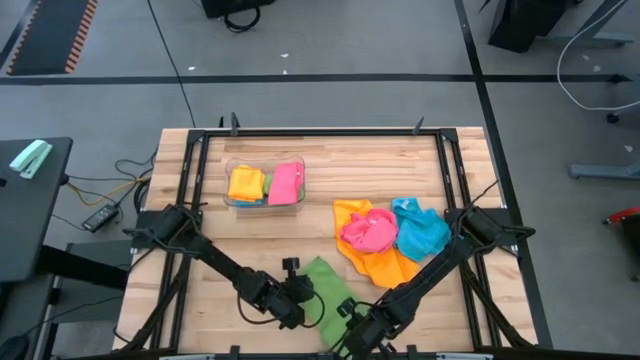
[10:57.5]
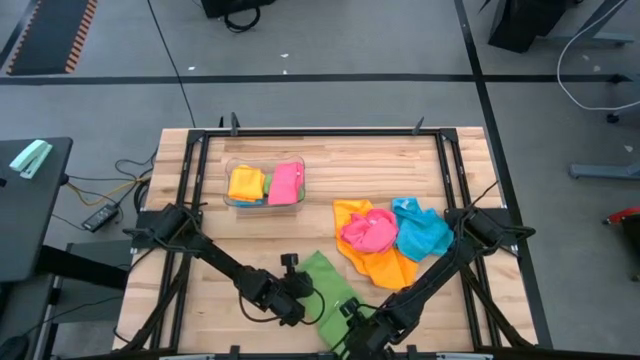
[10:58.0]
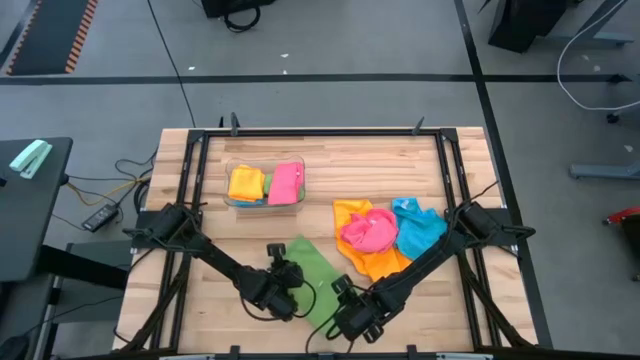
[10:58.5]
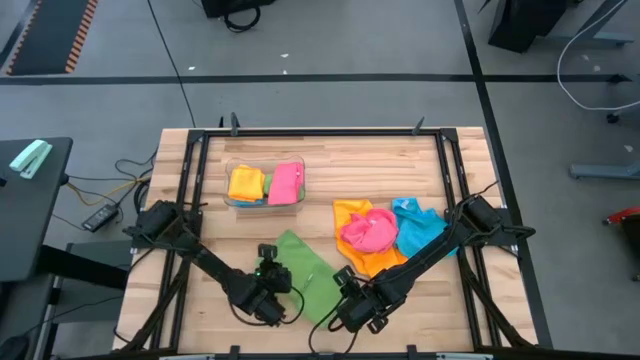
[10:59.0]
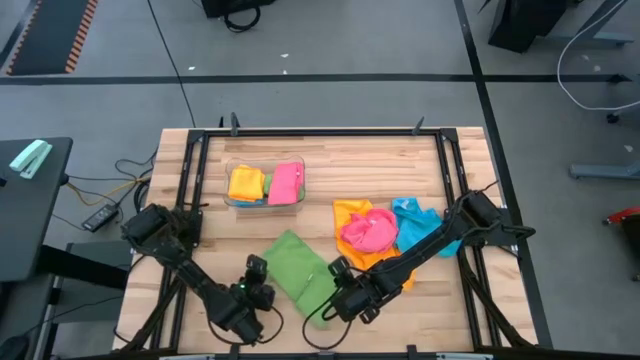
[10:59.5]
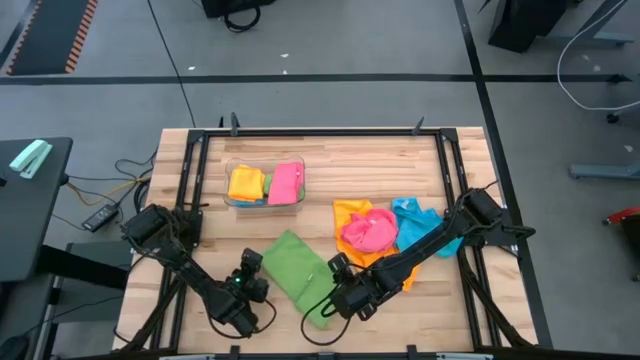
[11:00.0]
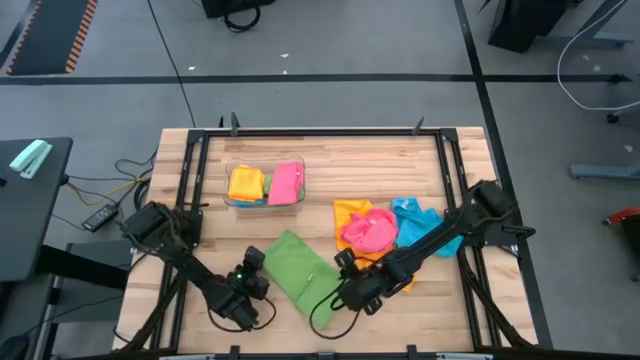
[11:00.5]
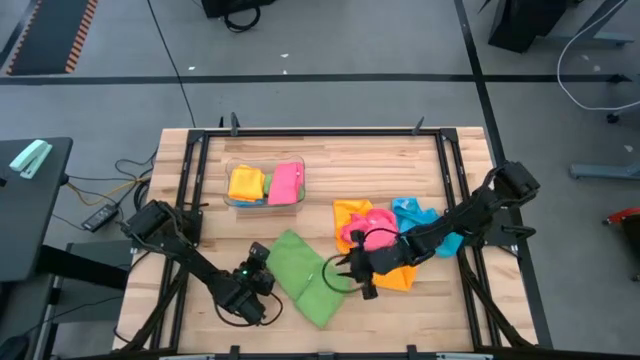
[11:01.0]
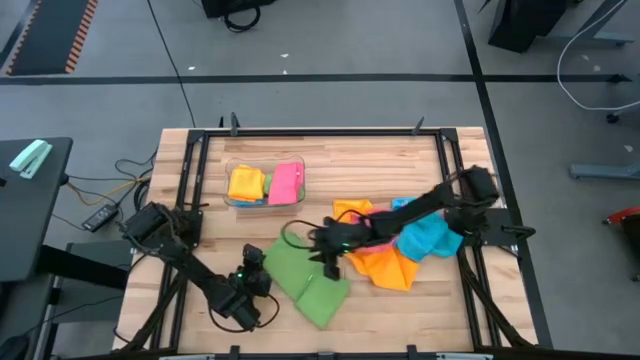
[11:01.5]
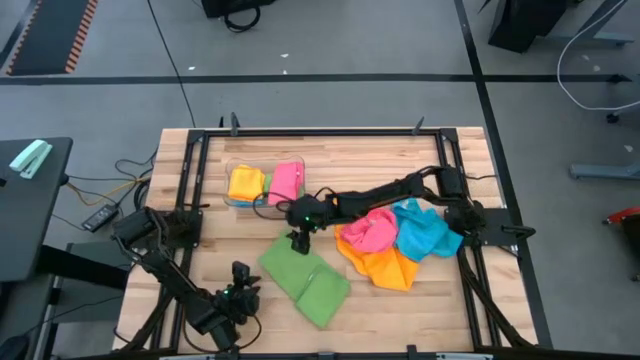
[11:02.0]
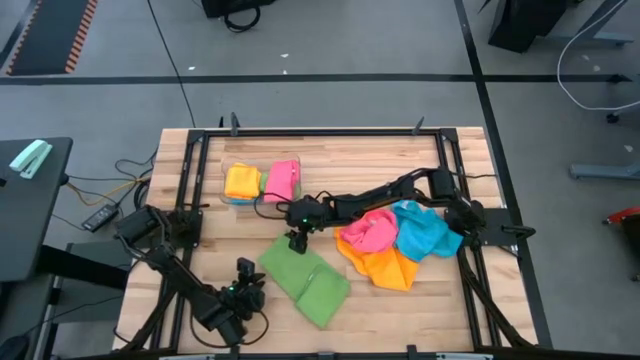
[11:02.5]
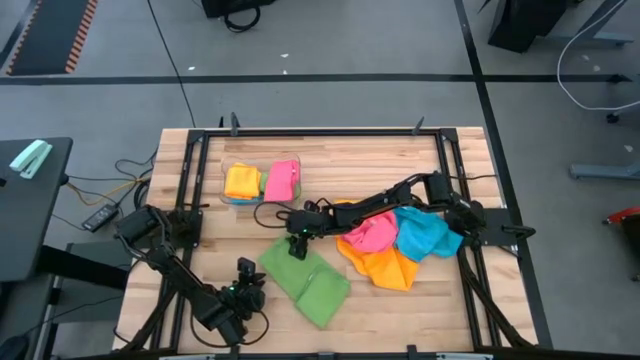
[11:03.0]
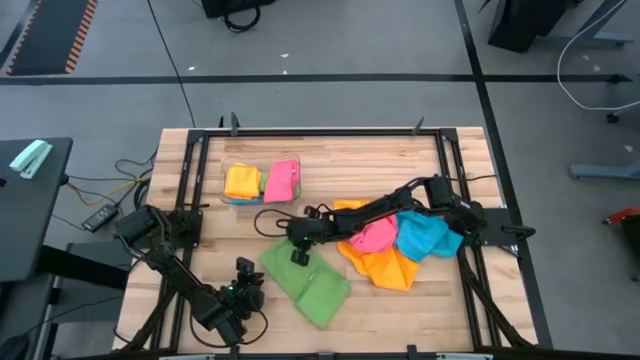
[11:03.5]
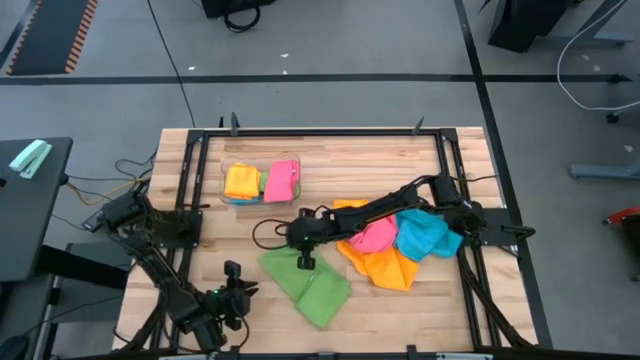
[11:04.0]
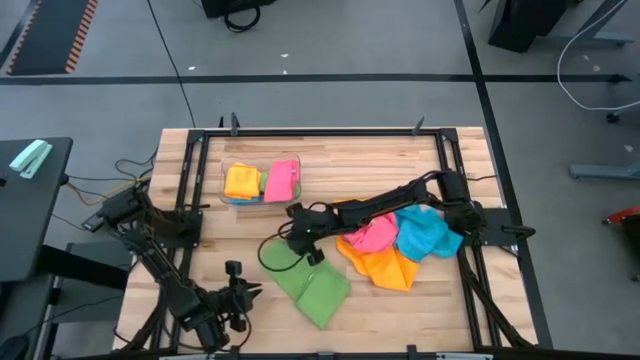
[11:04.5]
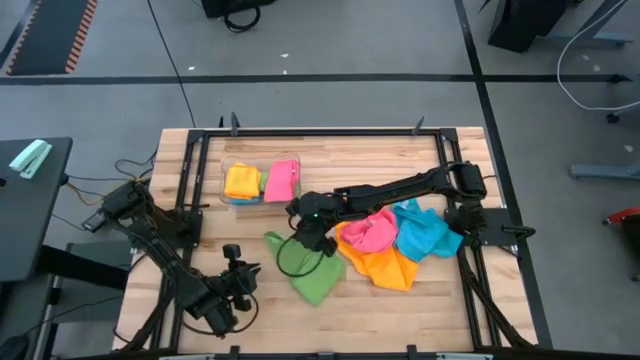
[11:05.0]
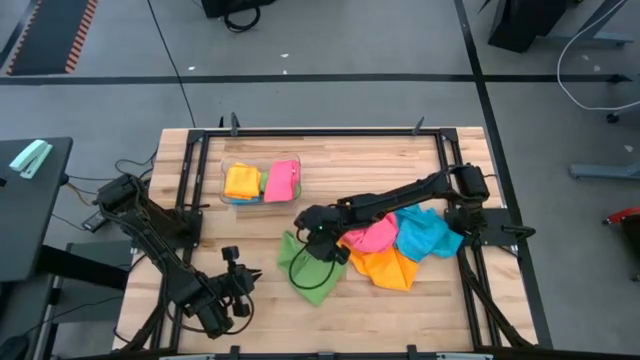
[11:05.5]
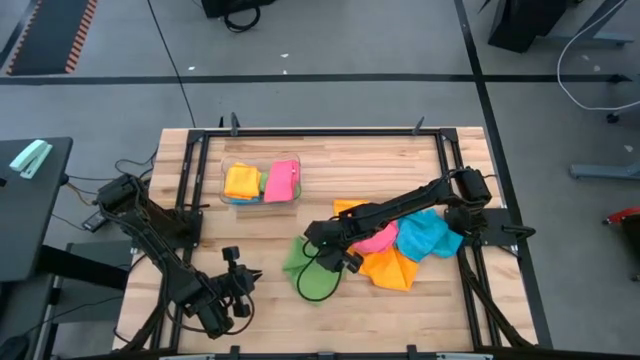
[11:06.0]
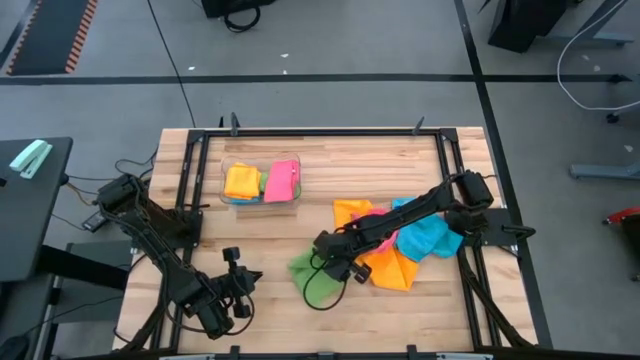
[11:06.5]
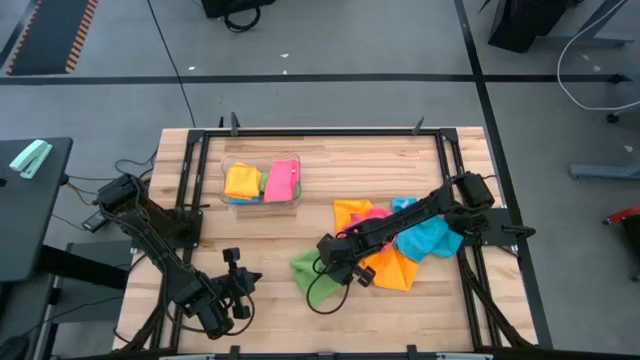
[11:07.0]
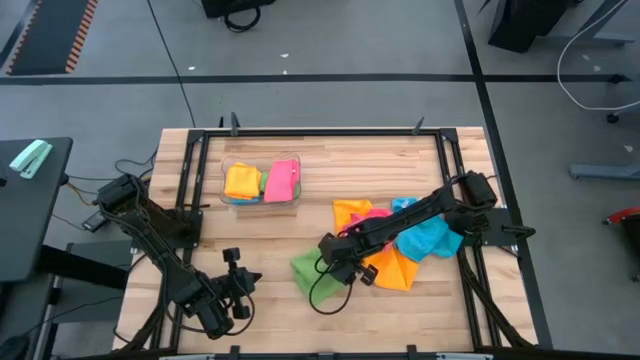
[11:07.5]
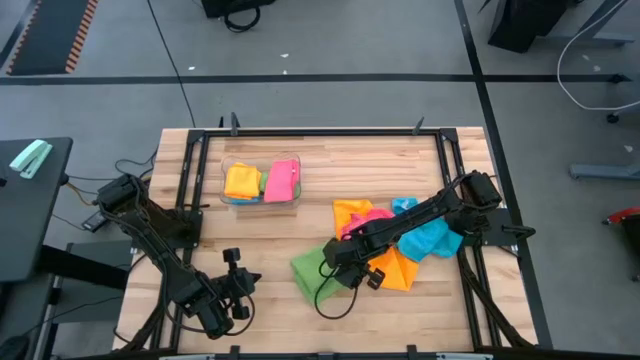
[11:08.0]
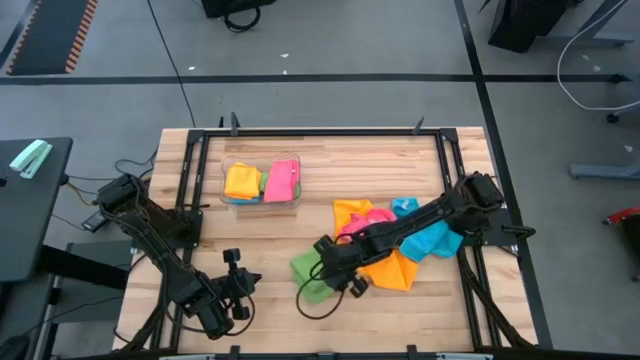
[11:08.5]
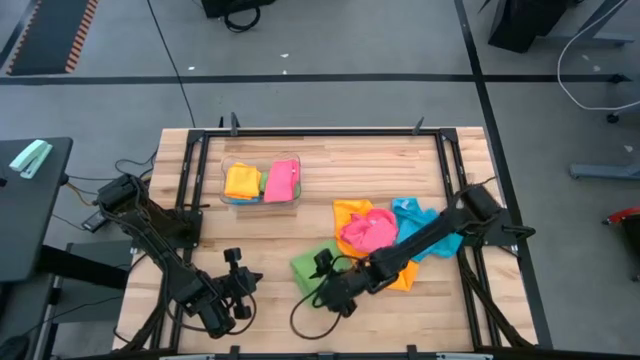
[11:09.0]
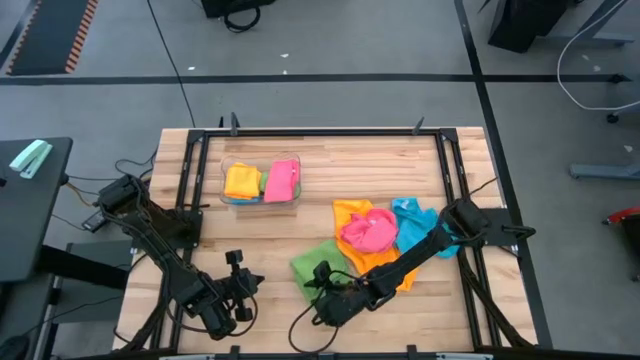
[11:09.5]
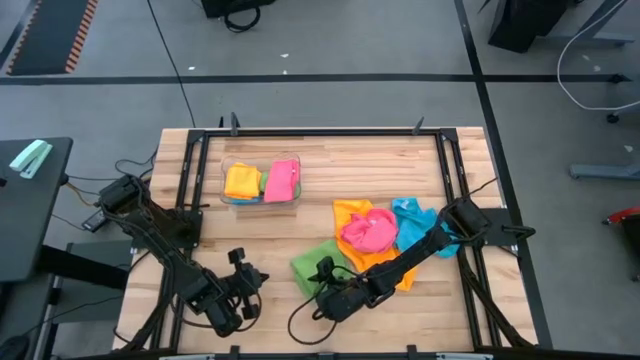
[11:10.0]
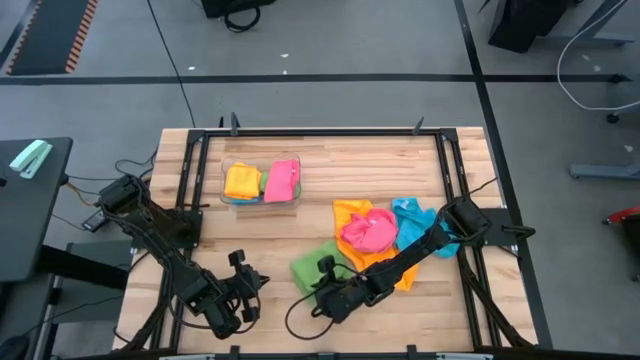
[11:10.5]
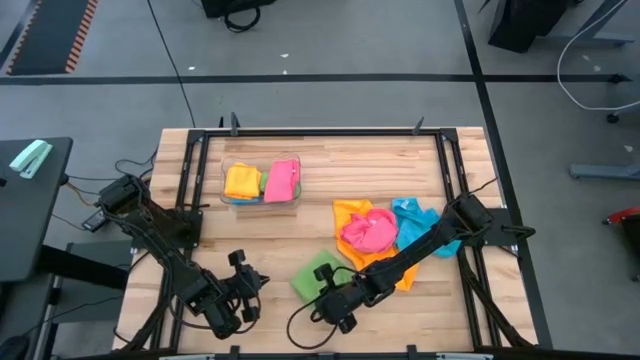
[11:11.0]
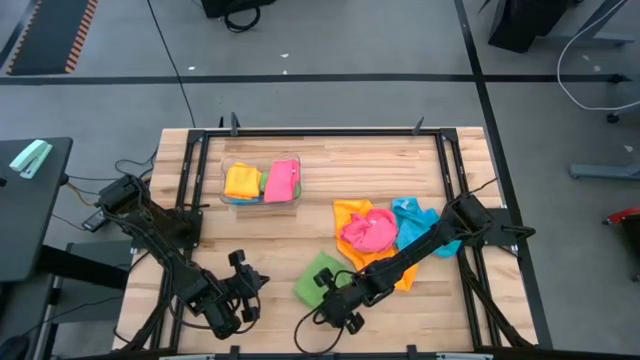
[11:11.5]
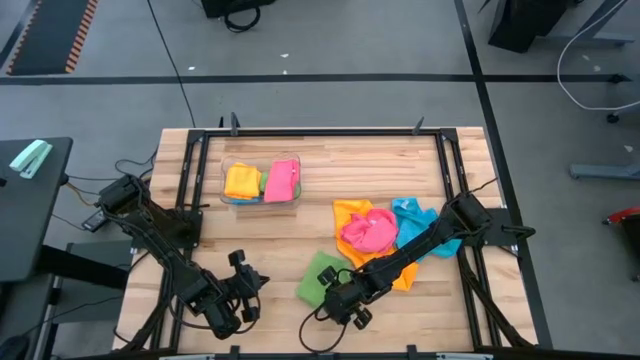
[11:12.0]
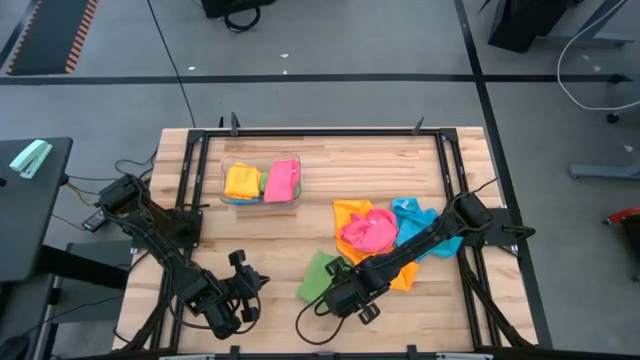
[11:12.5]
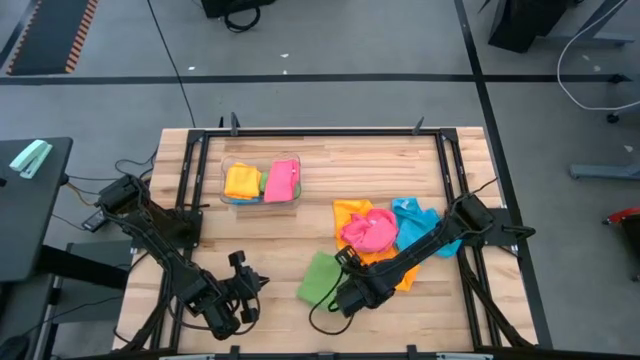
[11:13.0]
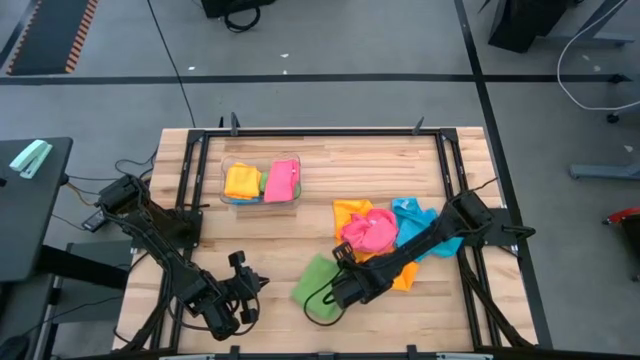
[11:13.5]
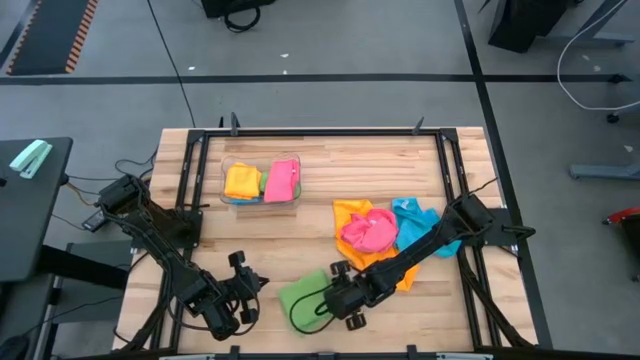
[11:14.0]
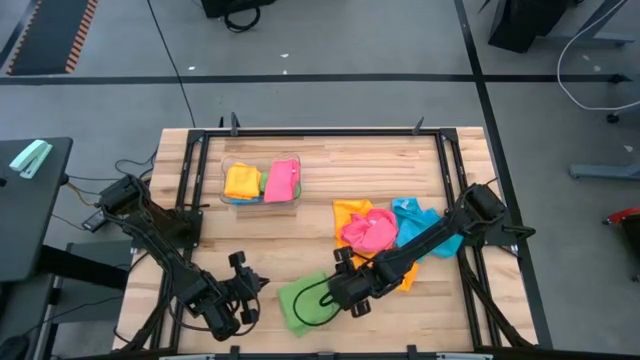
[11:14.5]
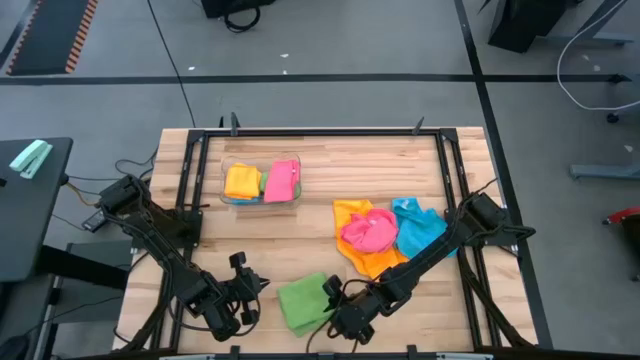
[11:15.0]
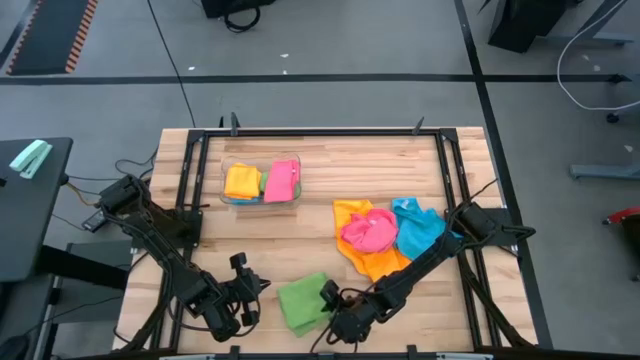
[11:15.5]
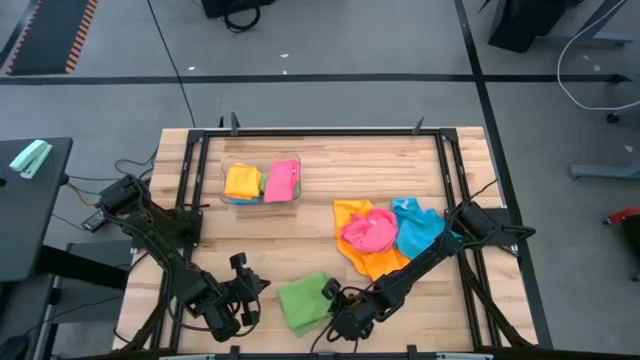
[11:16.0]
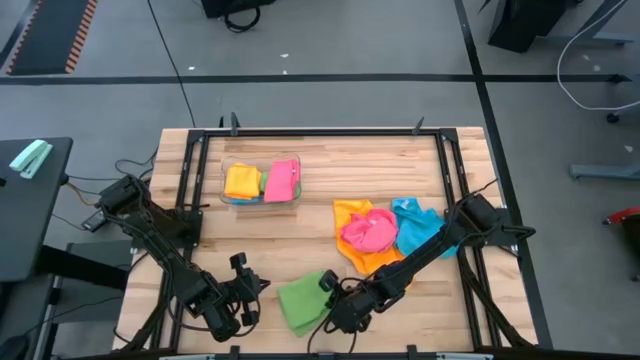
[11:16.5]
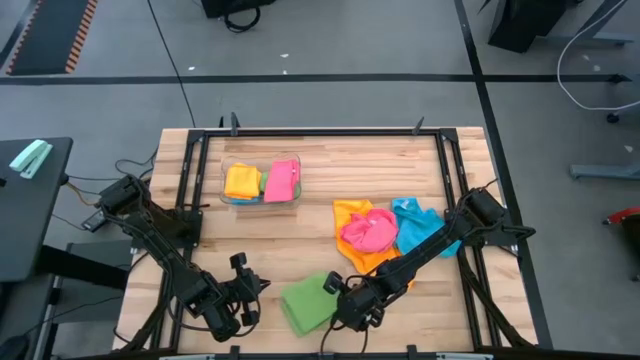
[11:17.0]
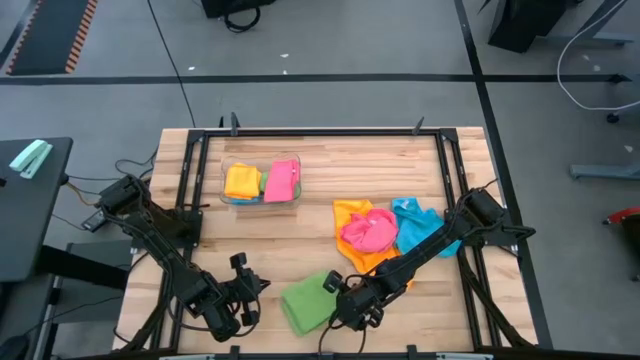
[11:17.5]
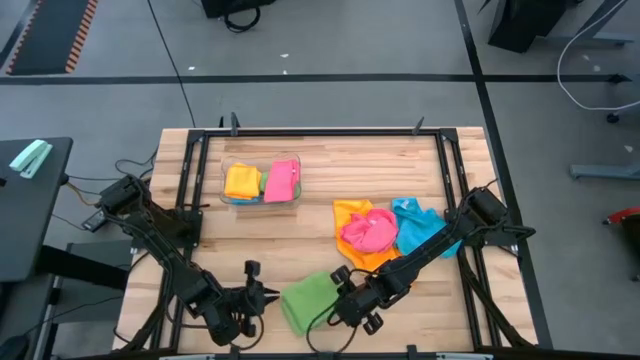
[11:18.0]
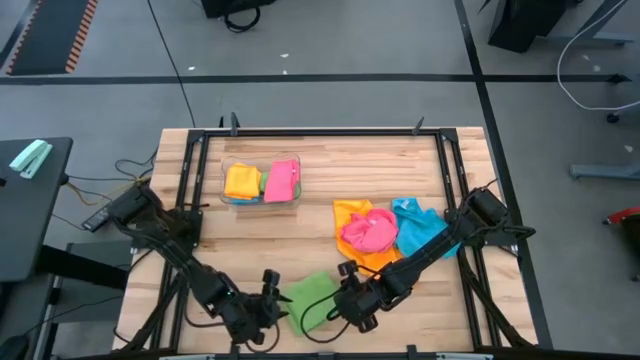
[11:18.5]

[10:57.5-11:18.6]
Task: Fold microfiber towels
Fold the green microfiber towel
